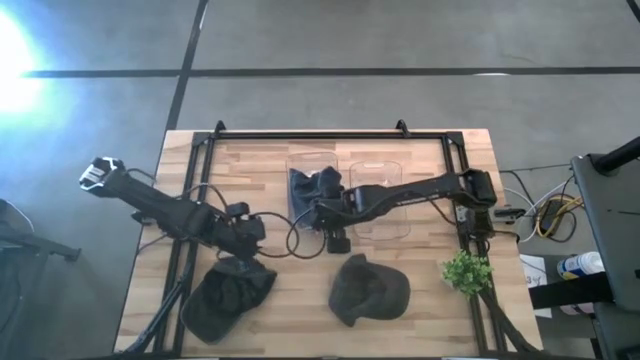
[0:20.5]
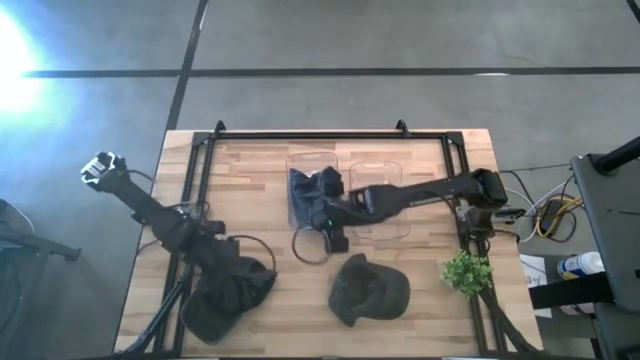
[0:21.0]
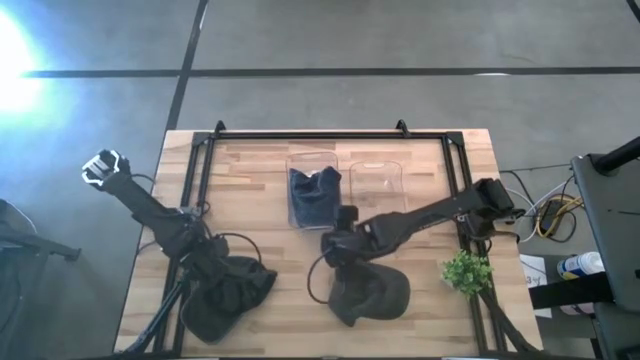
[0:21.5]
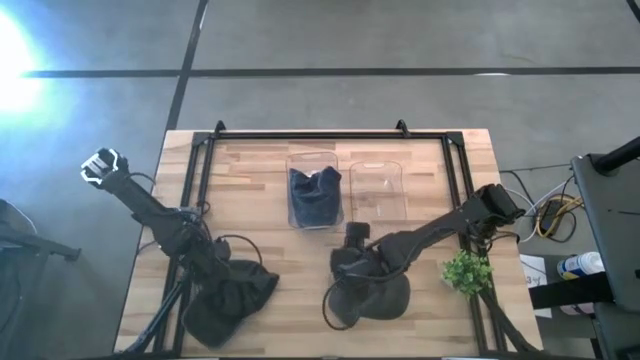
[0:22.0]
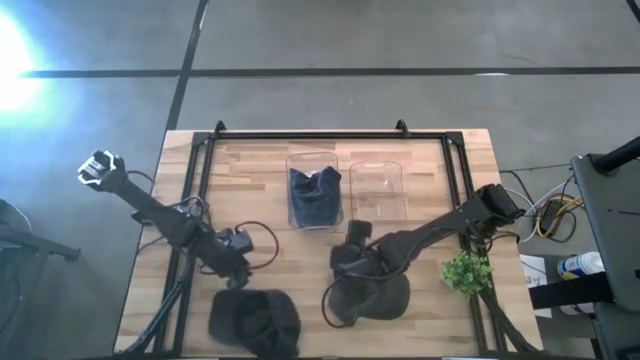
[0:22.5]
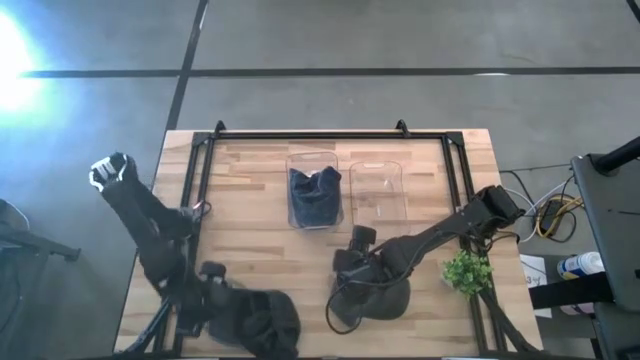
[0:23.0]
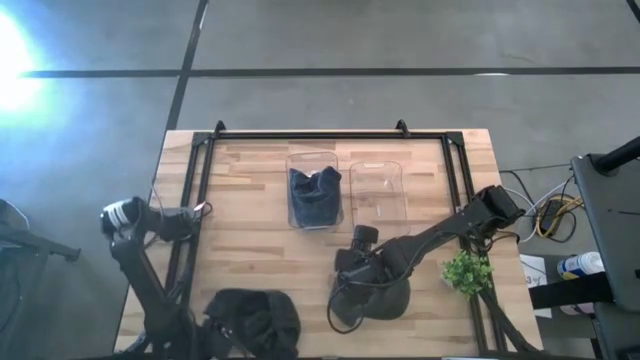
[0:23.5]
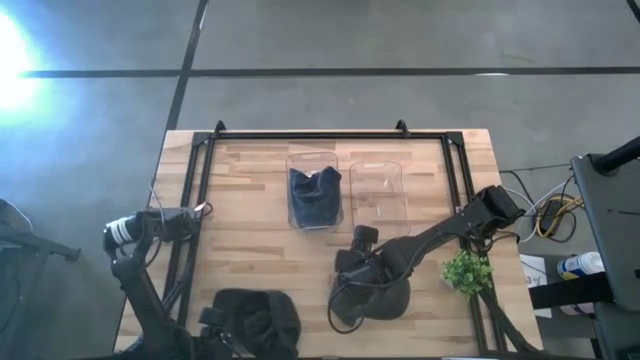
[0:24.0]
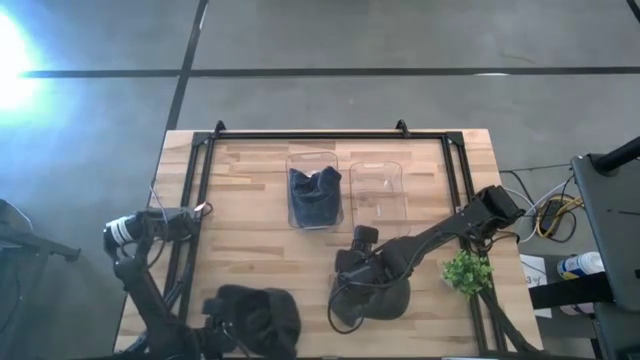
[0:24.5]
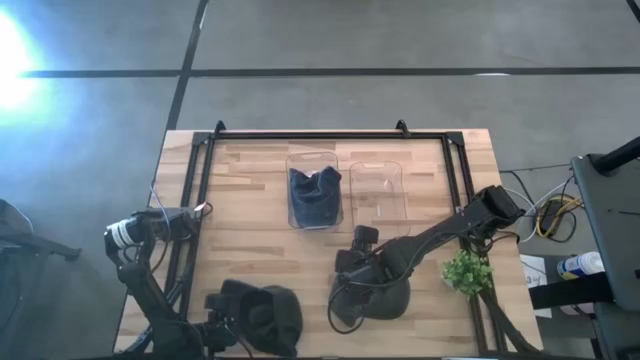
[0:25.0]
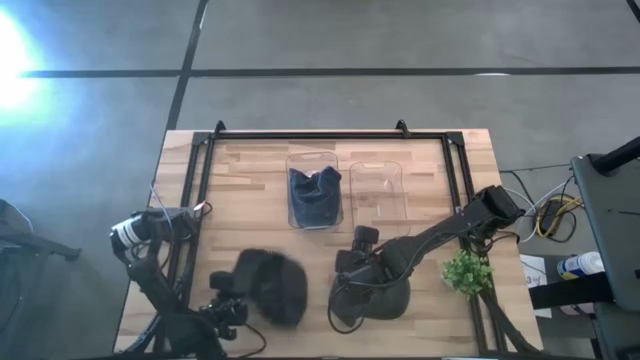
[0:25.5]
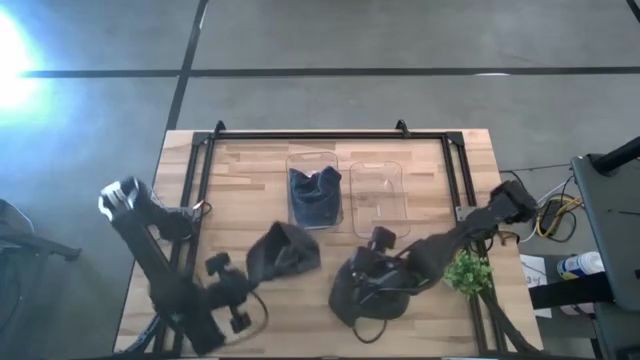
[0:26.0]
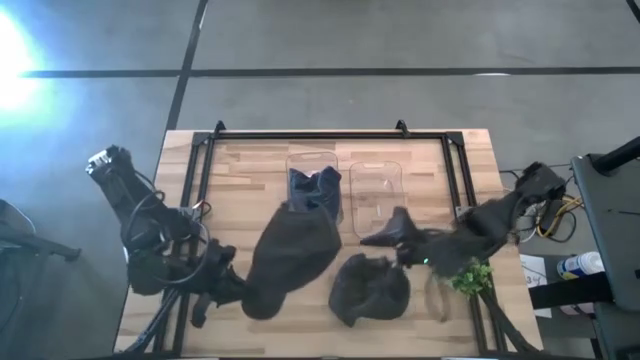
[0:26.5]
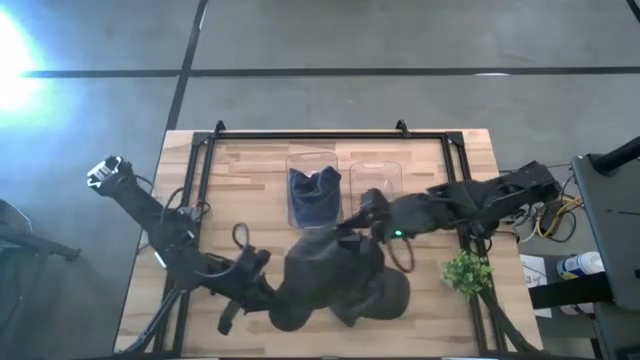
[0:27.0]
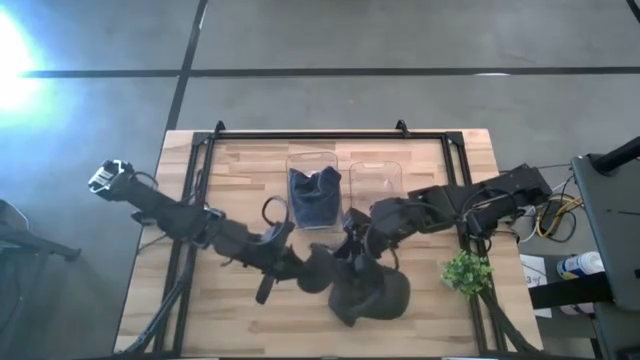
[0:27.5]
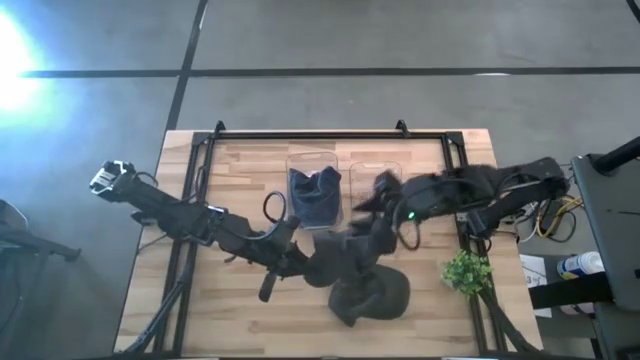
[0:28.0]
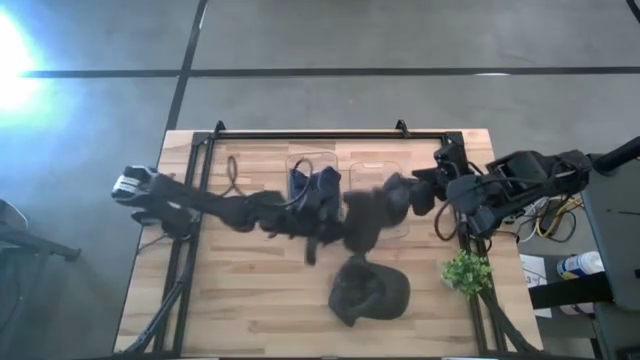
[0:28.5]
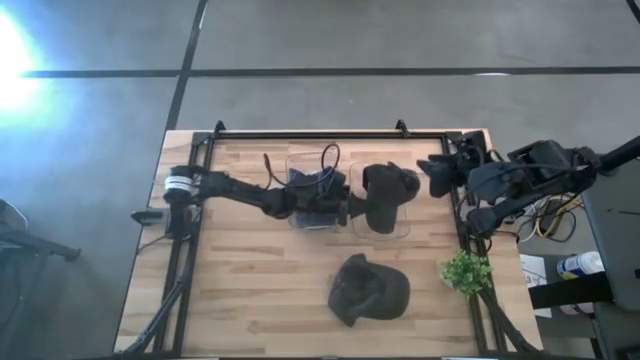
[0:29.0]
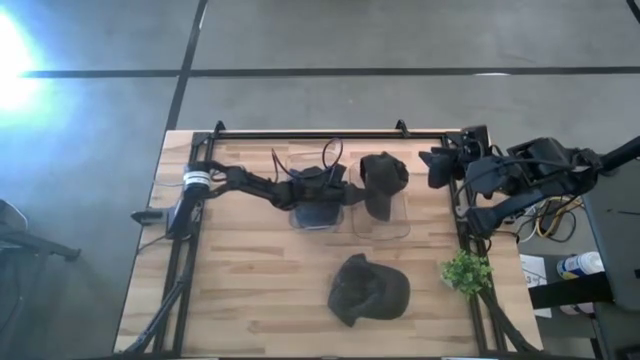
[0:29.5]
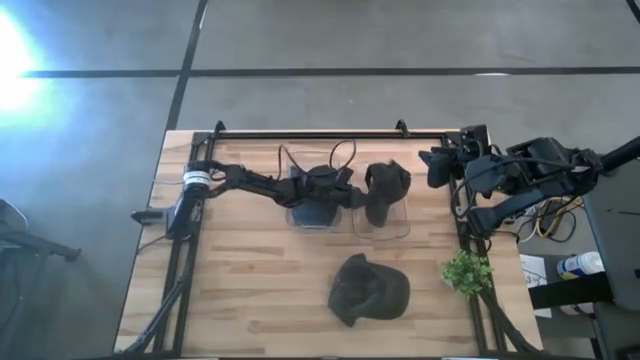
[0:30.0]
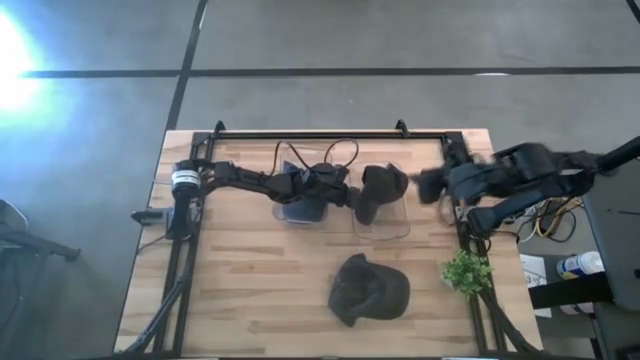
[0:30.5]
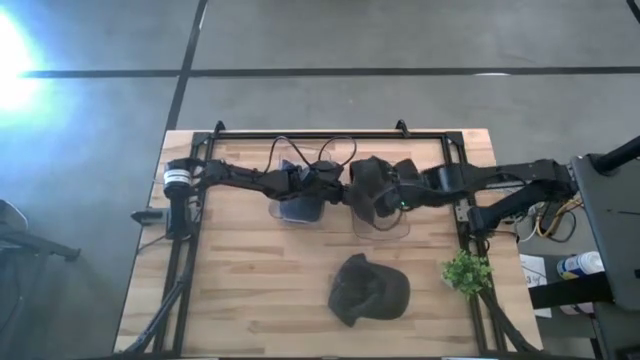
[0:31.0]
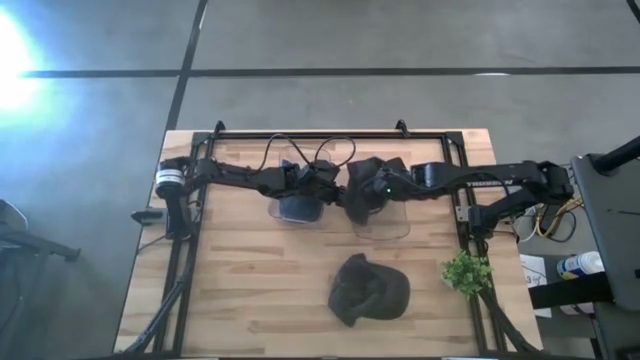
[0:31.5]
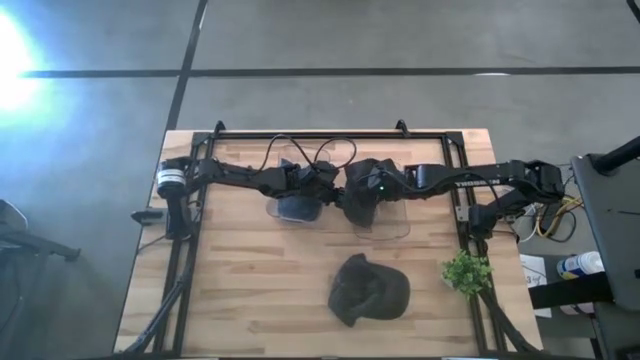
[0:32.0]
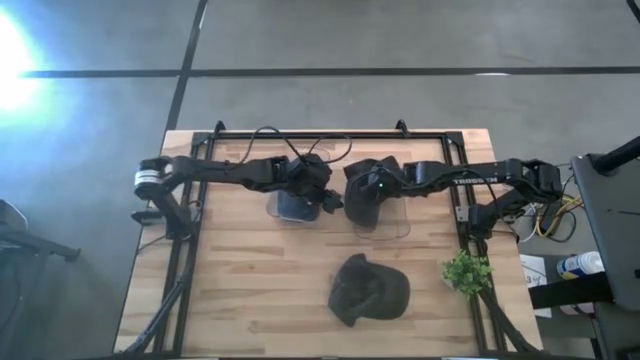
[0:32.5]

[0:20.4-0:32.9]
Task: Pick & Place hat
Put the left black cap into the right transparent bin

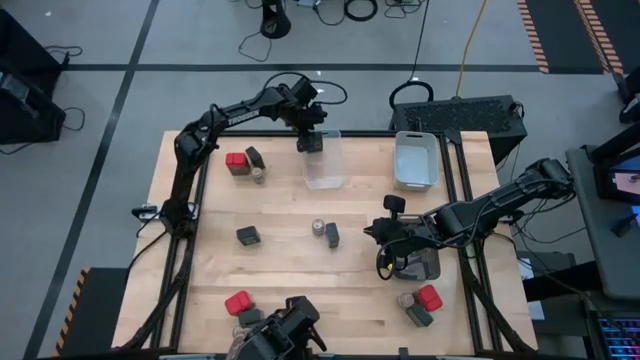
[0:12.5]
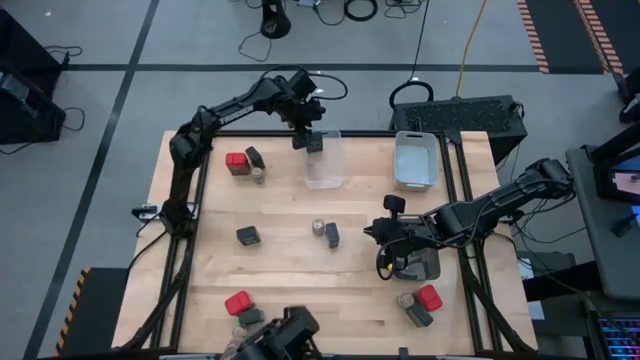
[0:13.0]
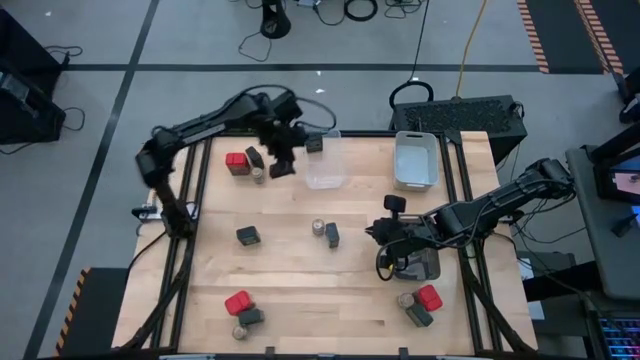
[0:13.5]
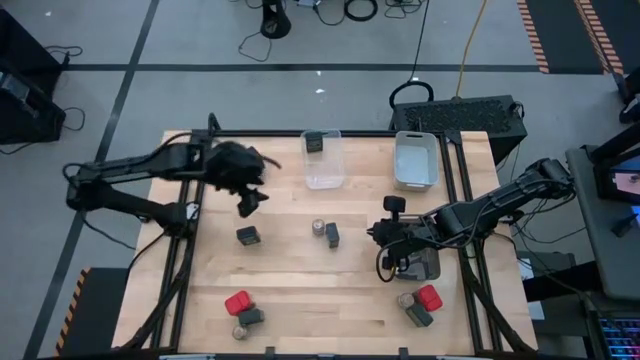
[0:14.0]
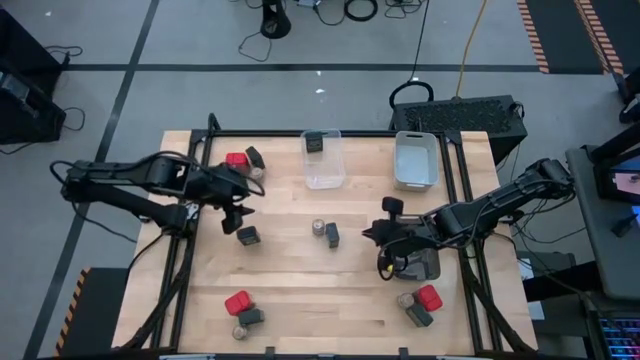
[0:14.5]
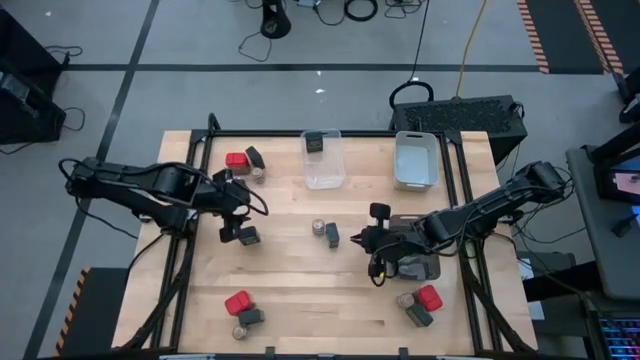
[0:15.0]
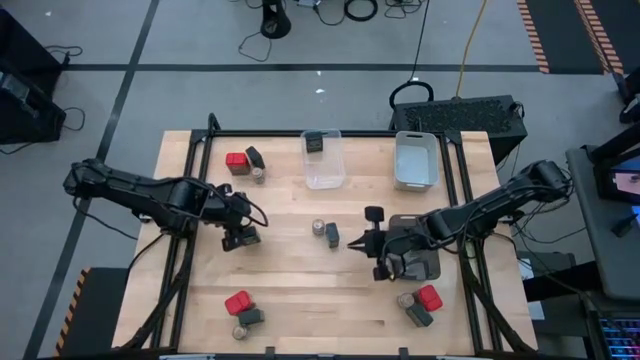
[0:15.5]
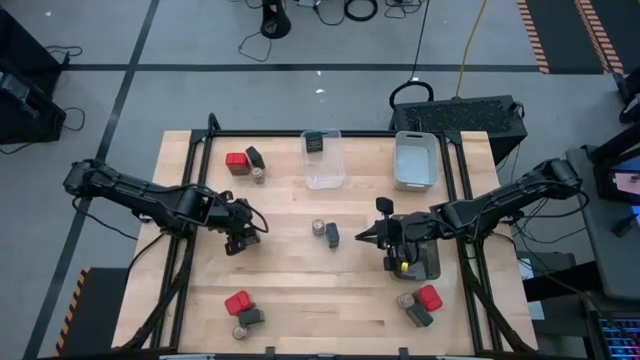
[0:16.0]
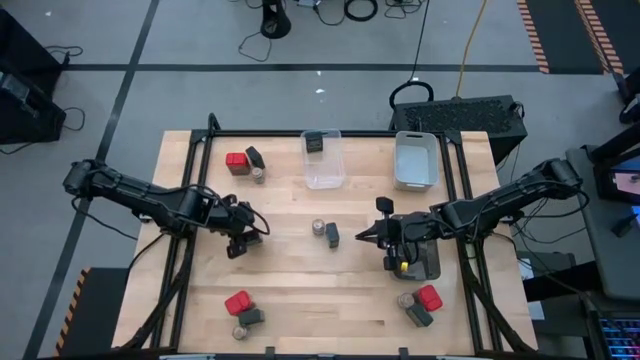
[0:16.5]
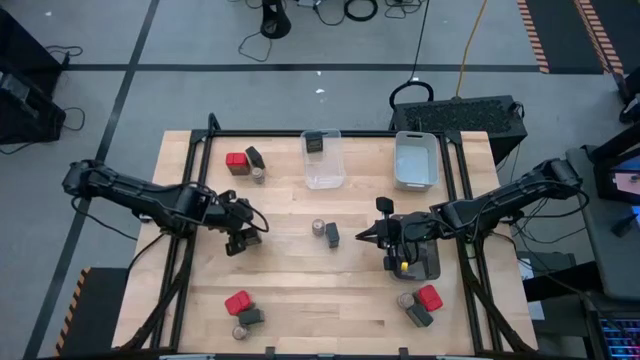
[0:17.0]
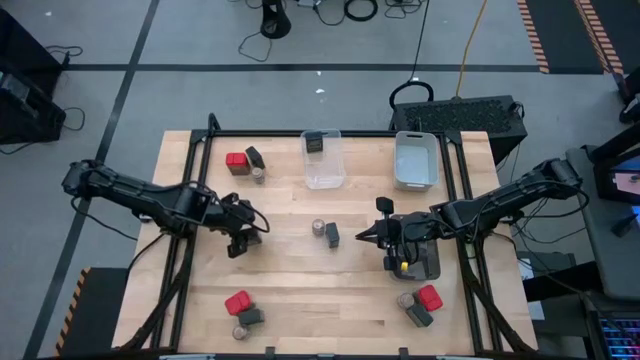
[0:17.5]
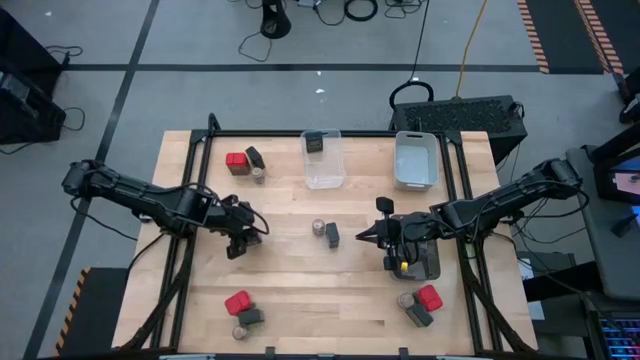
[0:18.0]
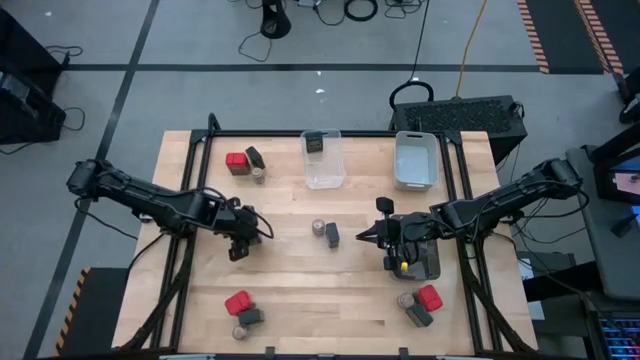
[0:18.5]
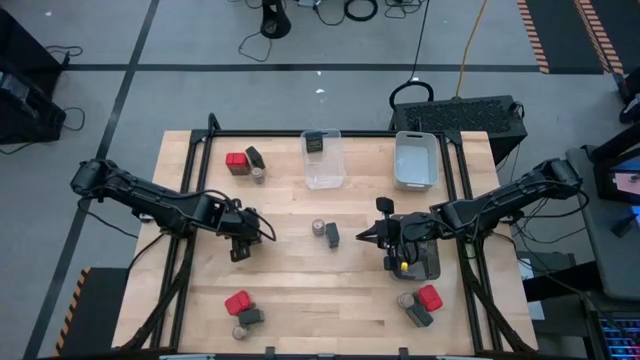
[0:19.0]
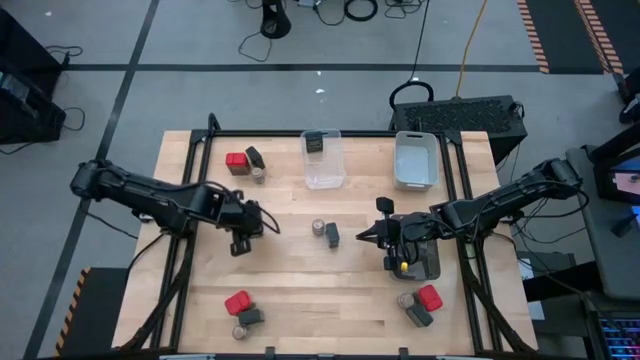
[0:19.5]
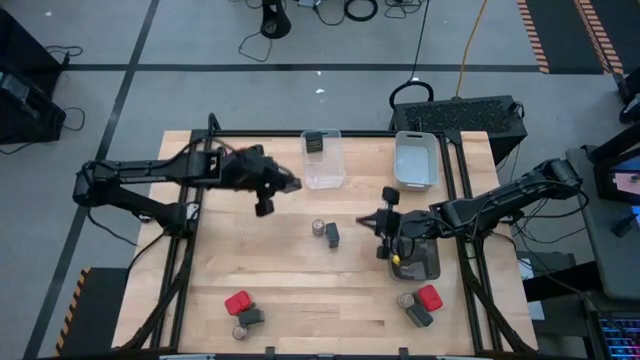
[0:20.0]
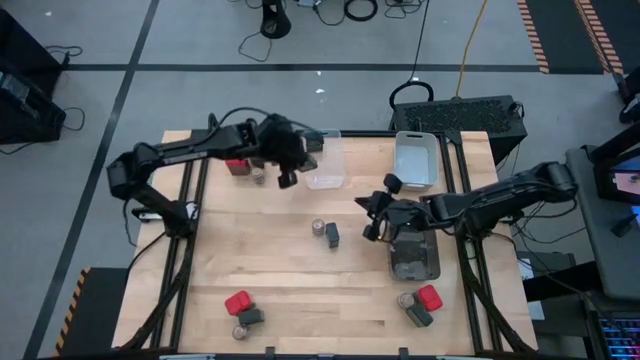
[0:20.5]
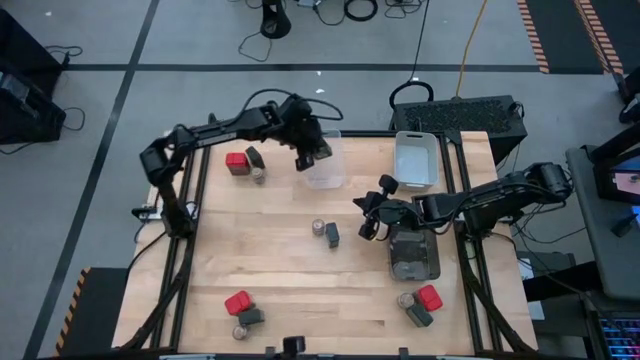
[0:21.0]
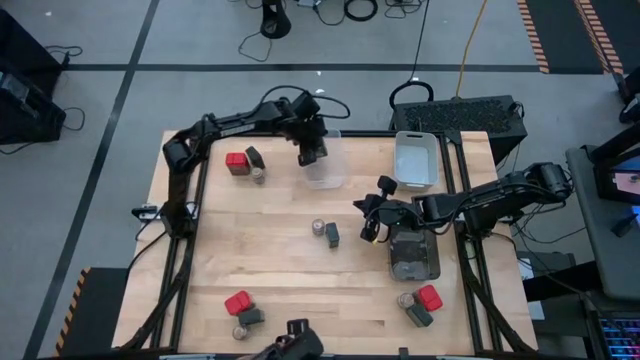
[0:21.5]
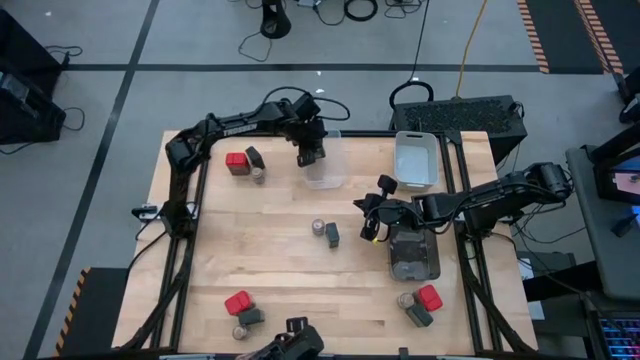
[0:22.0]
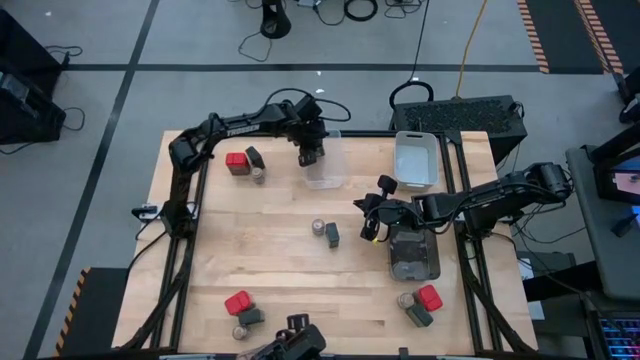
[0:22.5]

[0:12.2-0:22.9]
Task: Sort spices by type
Put the black seasoning can into the transparent bin
